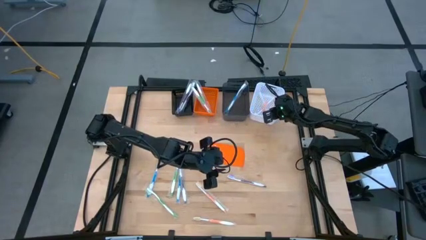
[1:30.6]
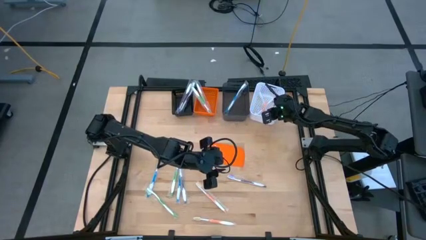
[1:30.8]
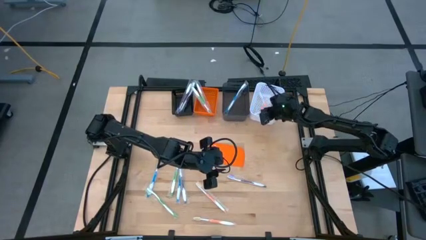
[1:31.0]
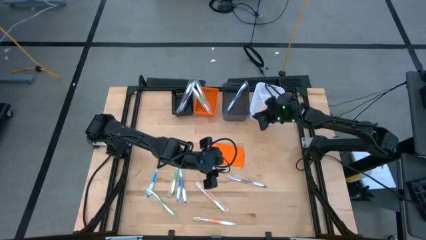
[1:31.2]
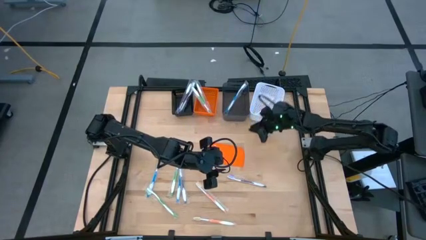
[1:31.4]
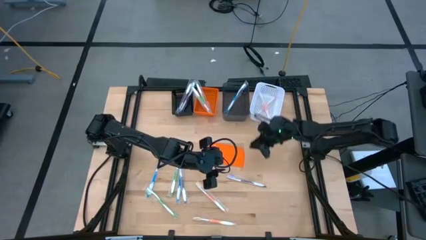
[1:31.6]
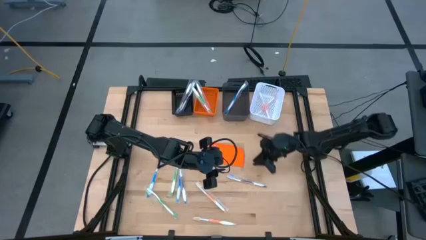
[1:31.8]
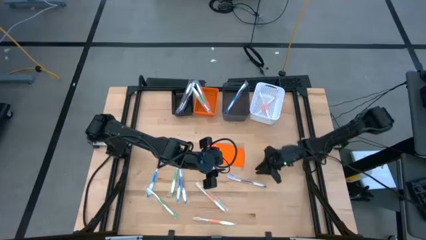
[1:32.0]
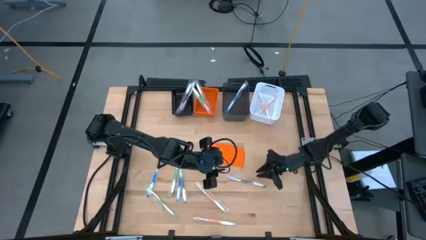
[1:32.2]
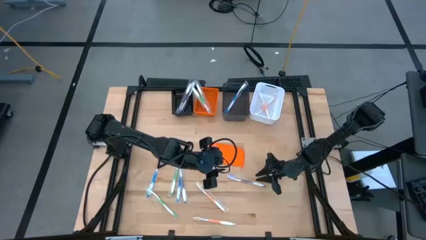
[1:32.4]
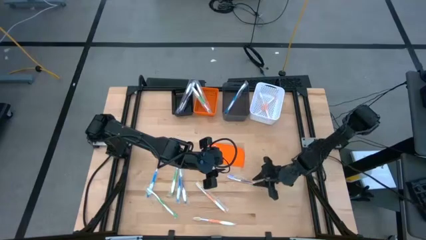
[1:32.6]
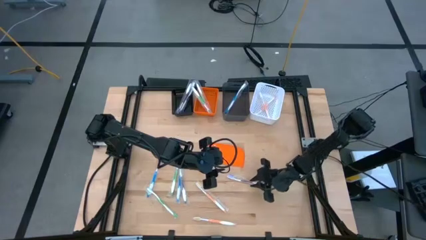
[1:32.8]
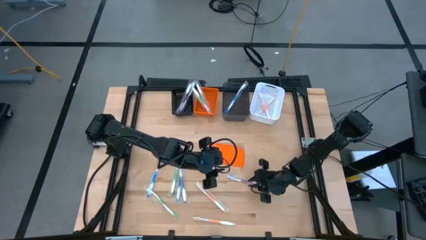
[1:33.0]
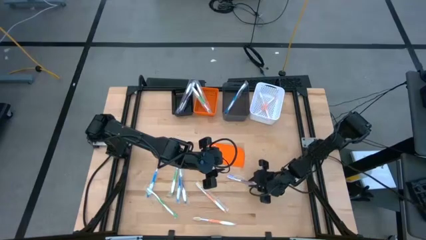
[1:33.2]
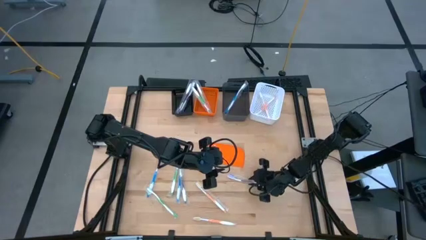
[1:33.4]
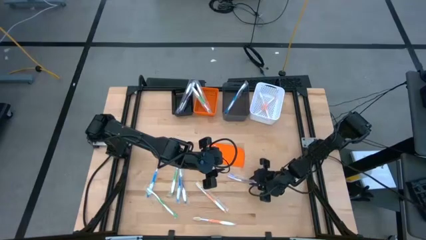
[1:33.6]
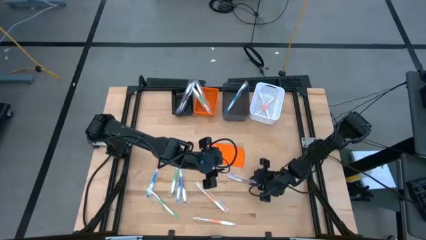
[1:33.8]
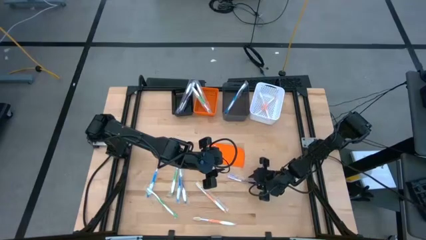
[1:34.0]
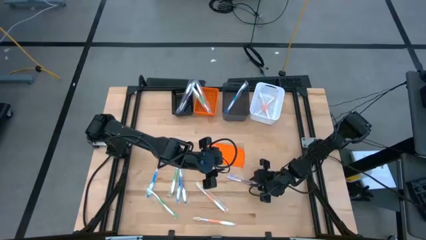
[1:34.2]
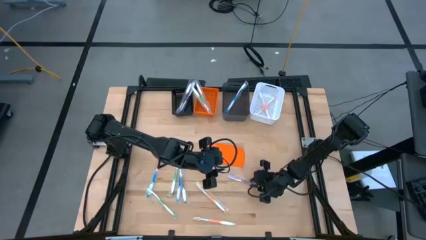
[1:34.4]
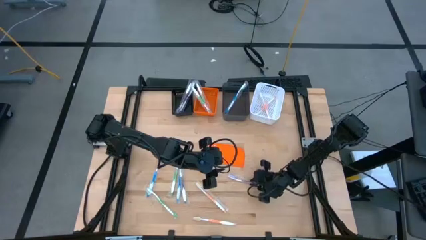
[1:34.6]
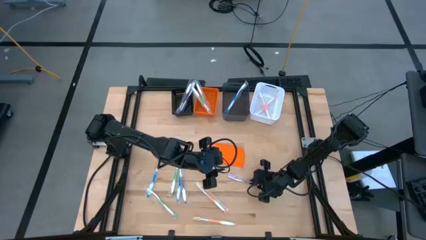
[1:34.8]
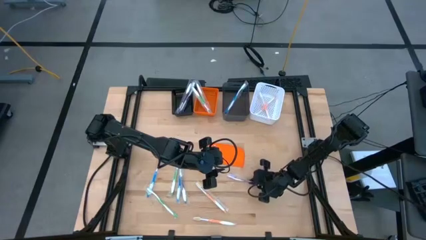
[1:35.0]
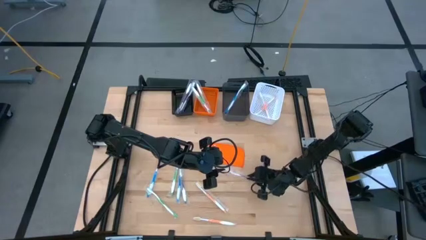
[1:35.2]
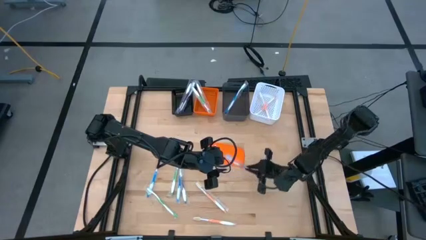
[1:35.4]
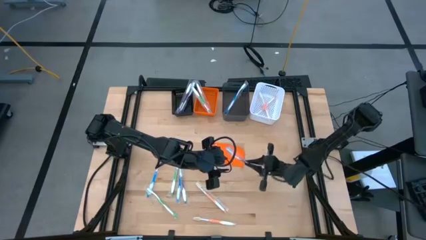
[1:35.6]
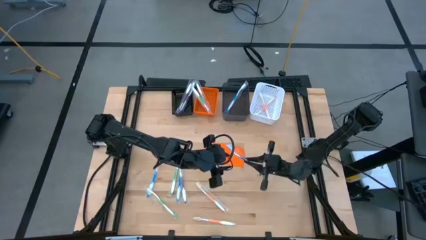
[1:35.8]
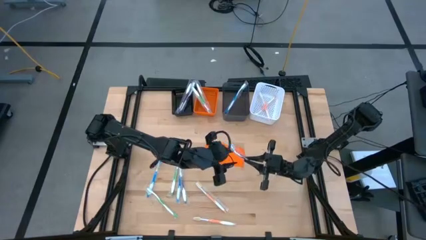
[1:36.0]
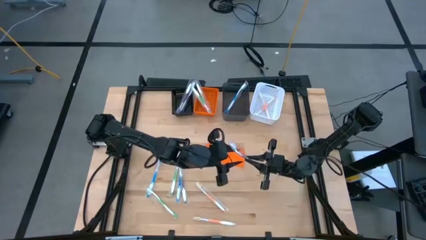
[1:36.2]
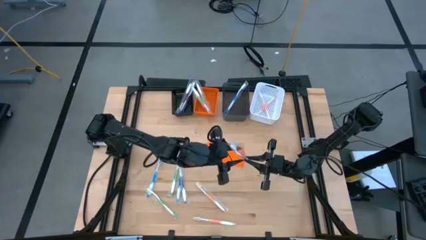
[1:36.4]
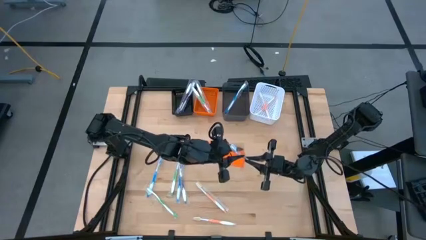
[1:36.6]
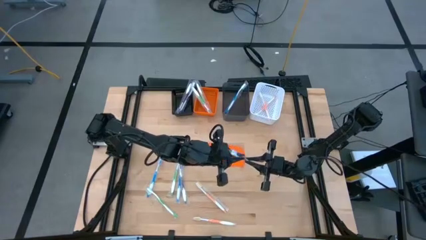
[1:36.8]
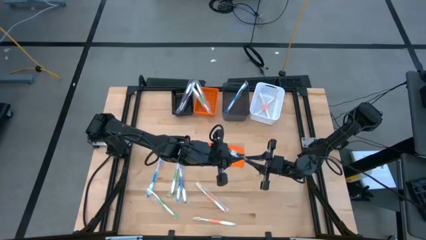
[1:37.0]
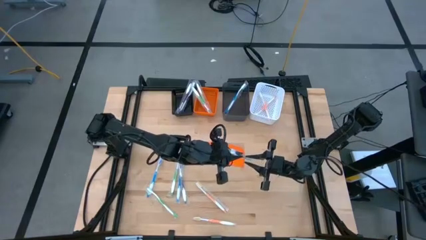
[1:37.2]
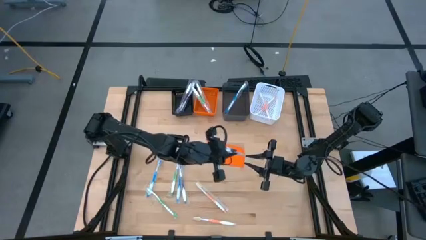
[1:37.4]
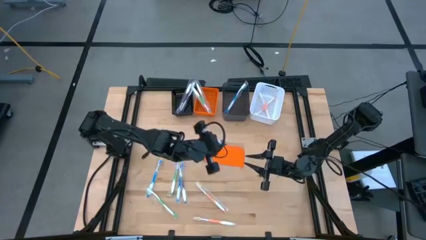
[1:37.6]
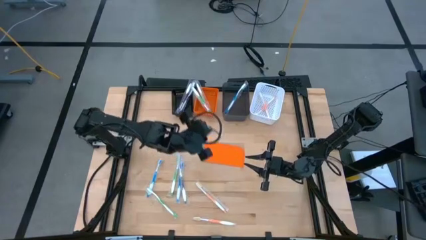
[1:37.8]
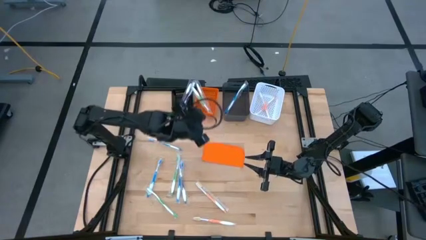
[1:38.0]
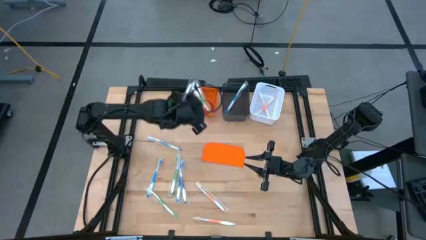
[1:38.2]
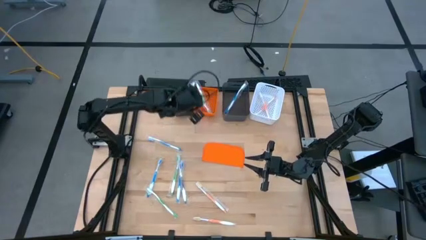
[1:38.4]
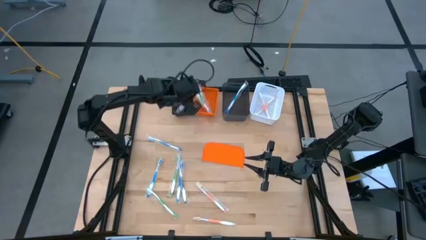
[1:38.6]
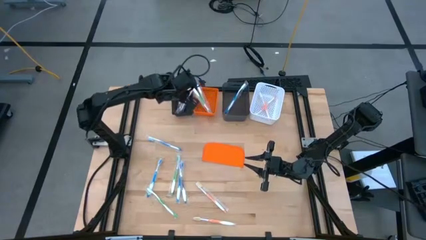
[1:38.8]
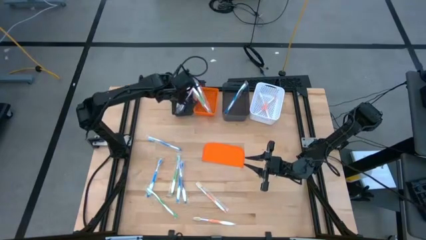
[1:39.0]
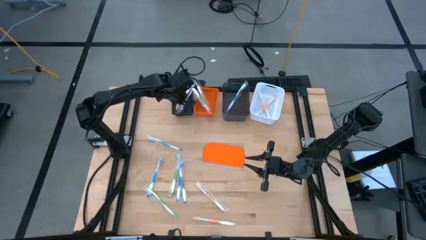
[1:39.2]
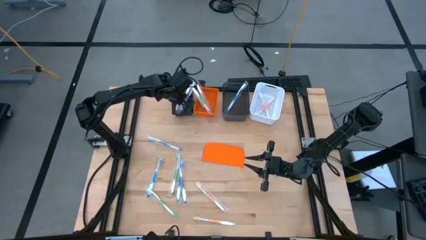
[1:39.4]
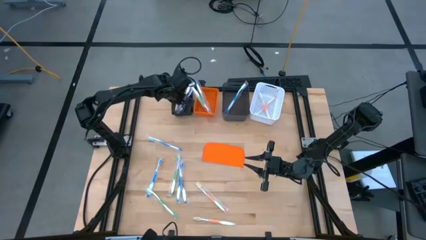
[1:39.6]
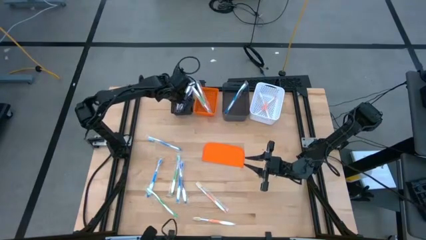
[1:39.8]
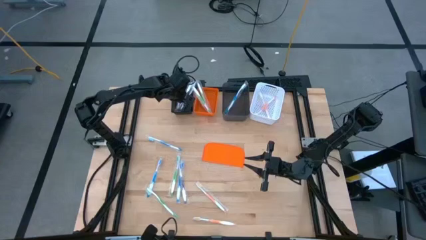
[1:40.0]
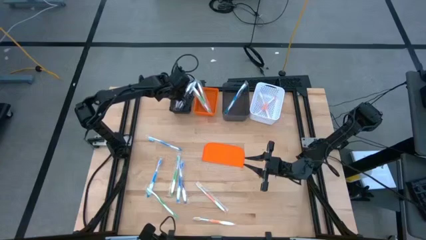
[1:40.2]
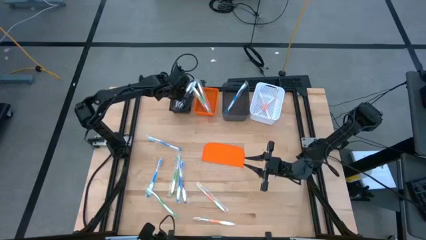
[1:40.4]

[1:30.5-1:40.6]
Task: Pick & Place Toothbrushes
Put the violet toothbrush into the black bin

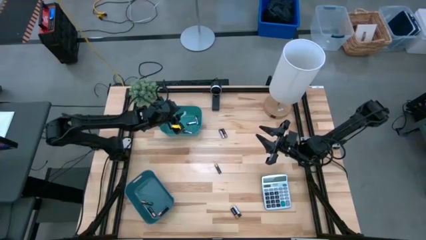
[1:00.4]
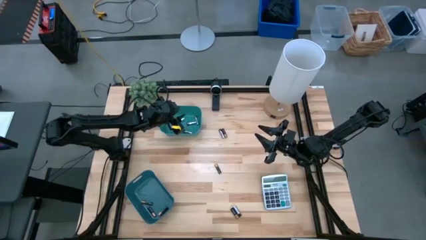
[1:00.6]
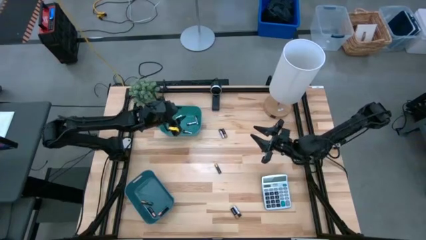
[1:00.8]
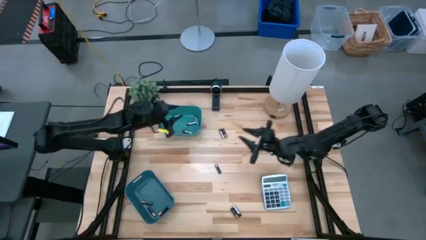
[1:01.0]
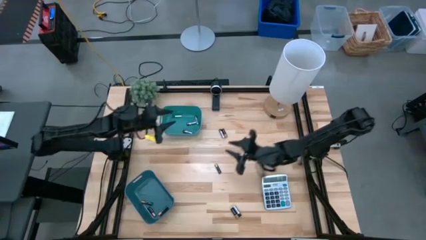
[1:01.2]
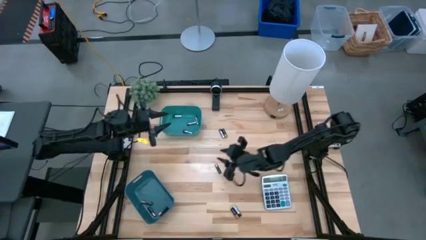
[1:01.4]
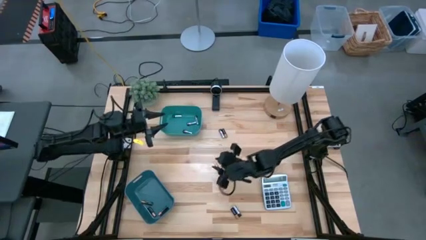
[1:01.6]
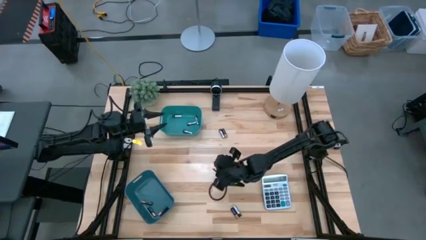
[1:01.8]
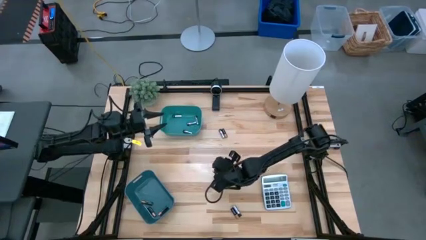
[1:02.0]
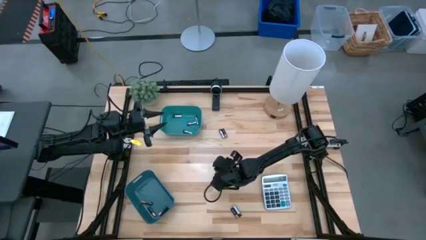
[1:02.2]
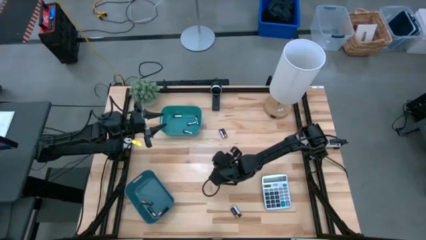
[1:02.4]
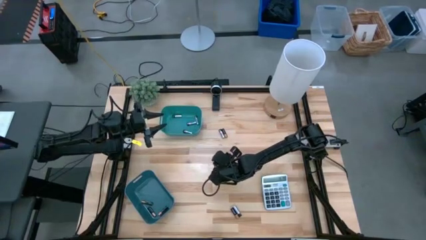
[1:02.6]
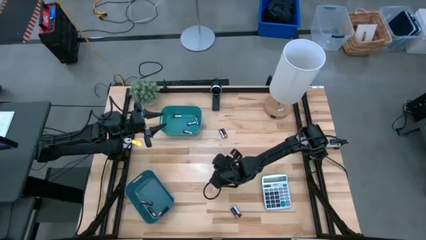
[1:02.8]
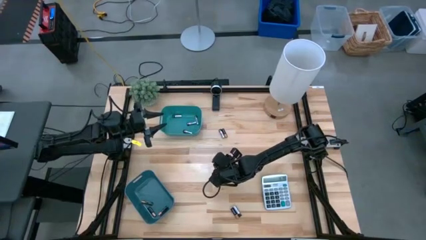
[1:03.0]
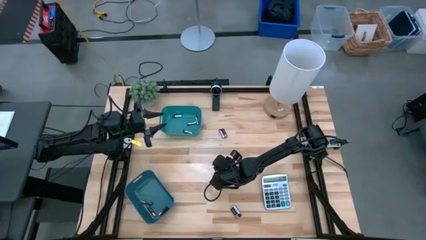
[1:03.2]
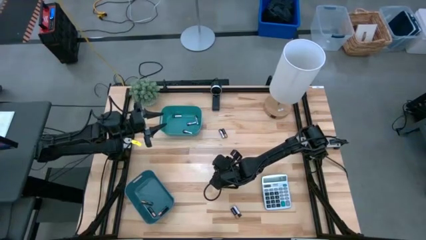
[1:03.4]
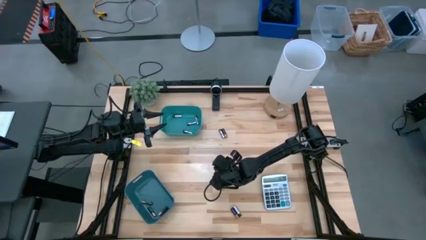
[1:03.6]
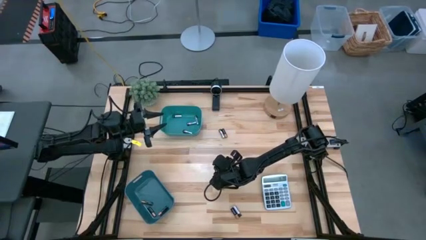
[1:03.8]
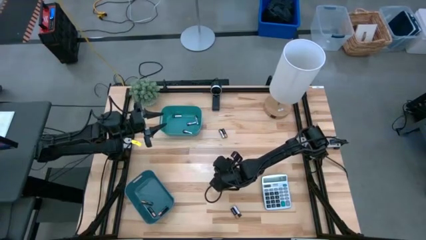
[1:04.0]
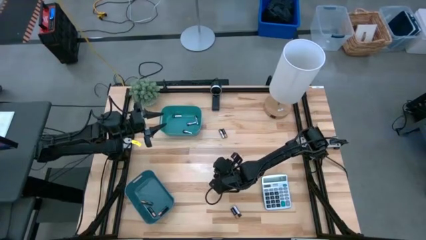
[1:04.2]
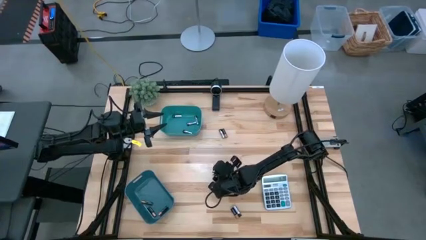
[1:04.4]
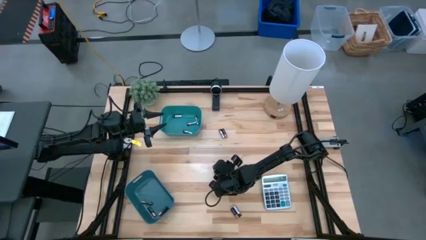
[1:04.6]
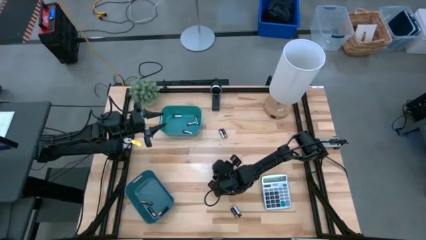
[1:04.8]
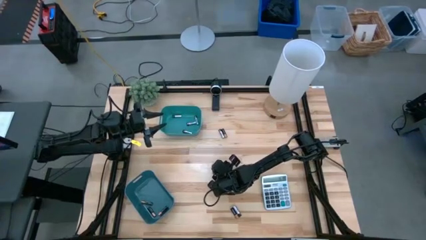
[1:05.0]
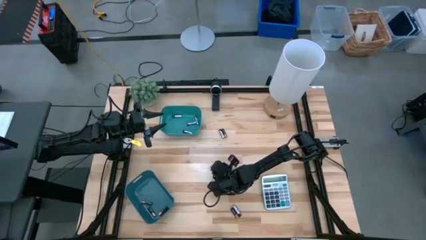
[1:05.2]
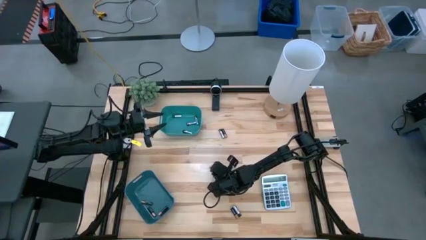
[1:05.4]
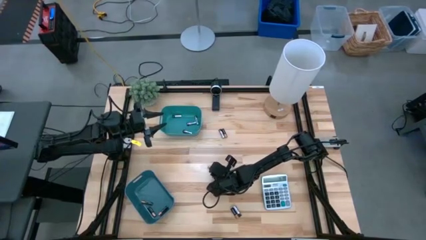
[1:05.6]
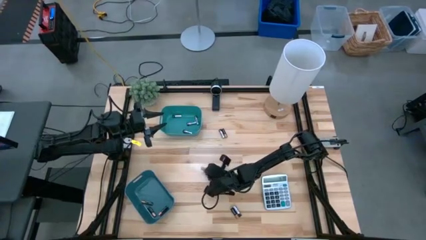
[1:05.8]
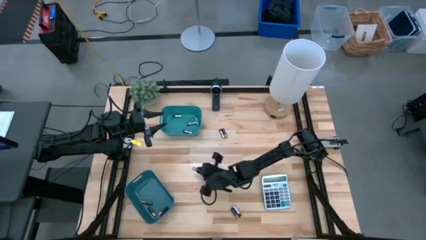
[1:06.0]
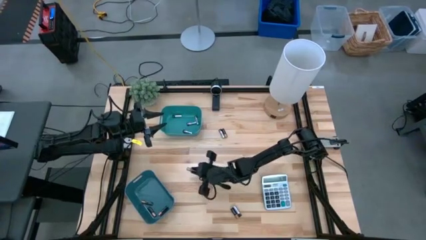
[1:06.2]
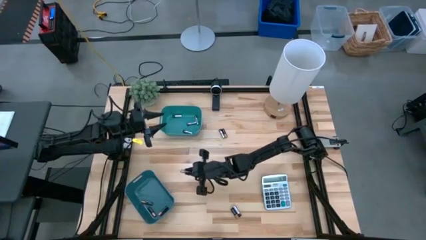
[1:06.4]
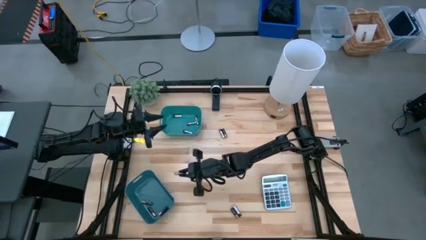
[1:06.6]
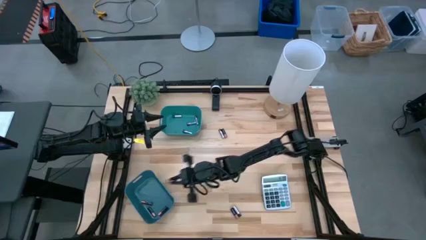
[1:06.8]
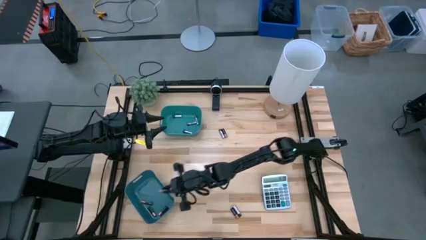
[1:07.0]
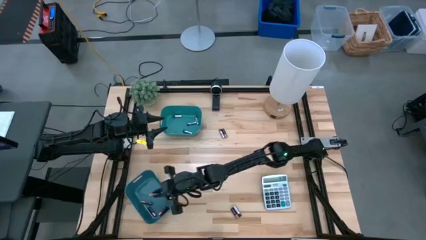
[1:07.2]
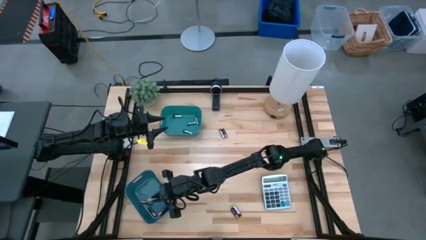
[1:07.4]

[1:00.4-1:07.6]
Task: Sort batteries
Put the middle black battery into the blue bin
